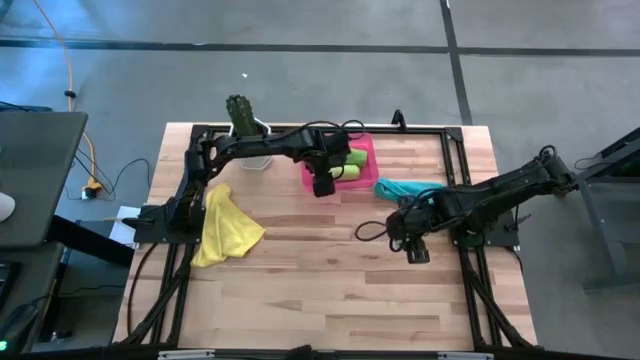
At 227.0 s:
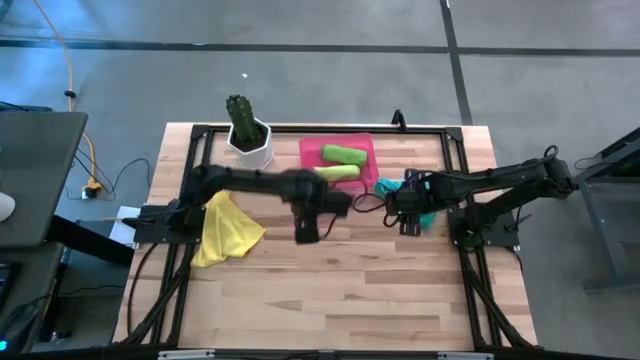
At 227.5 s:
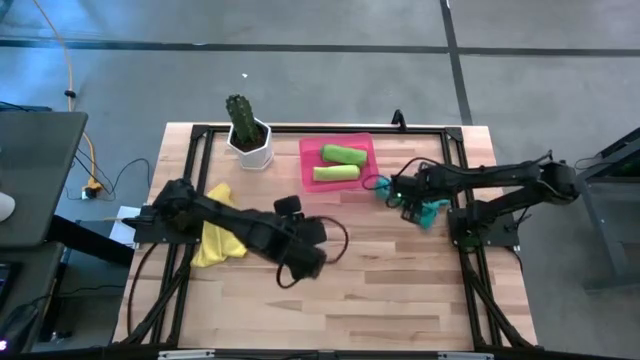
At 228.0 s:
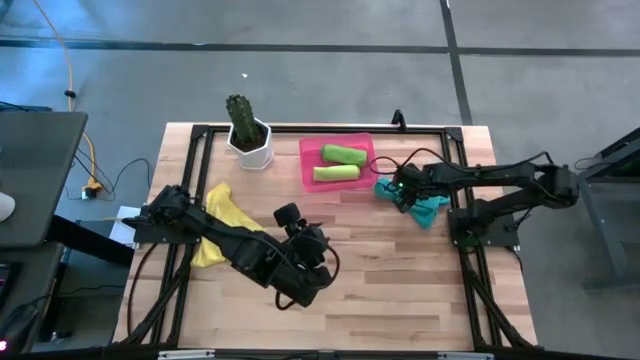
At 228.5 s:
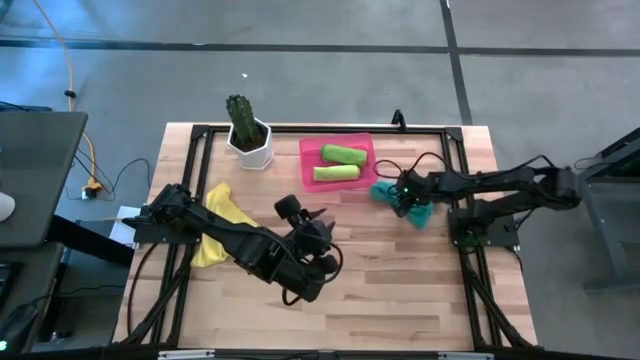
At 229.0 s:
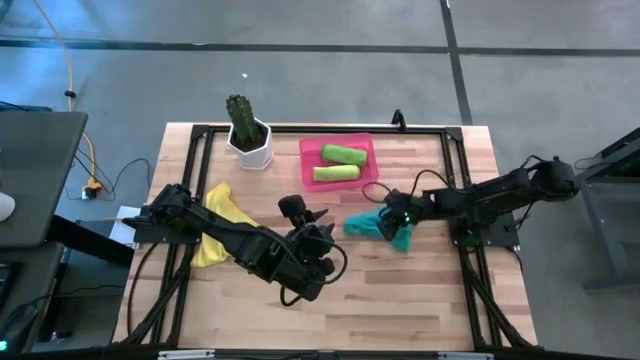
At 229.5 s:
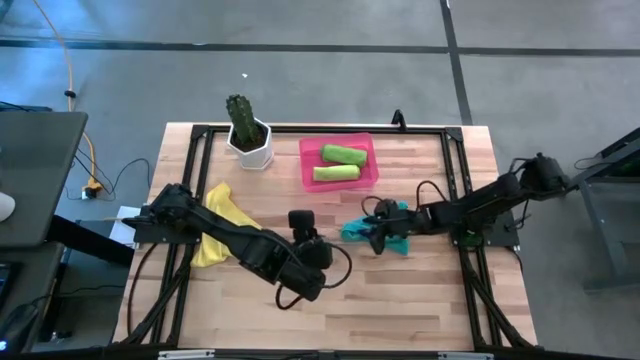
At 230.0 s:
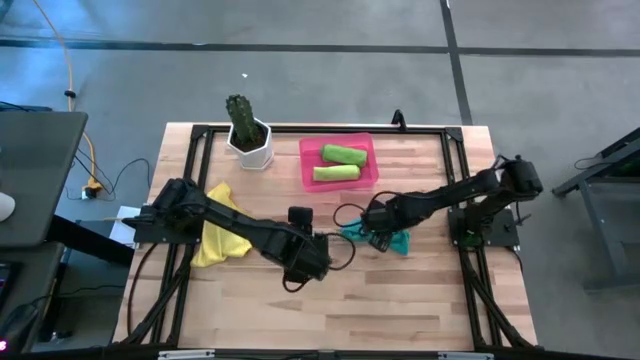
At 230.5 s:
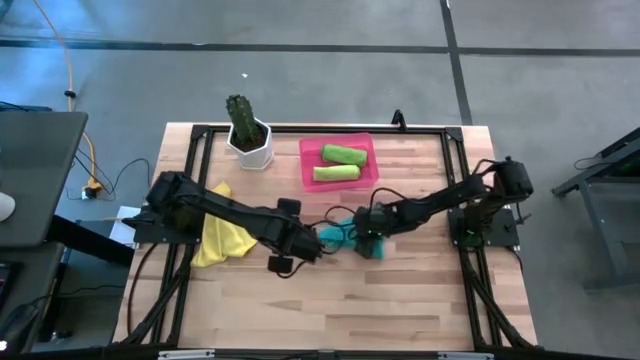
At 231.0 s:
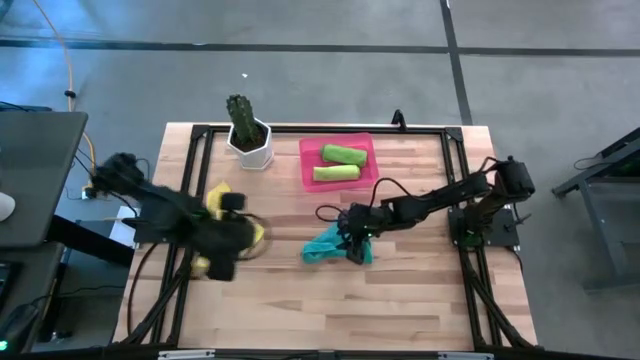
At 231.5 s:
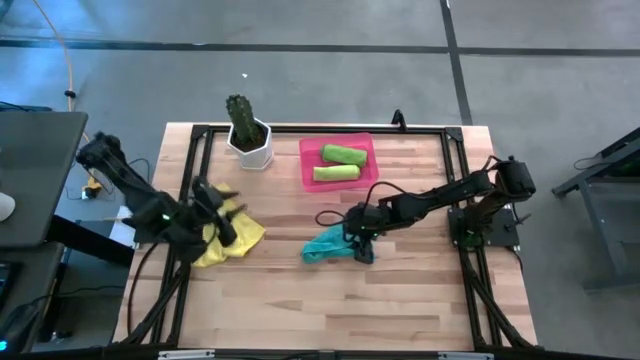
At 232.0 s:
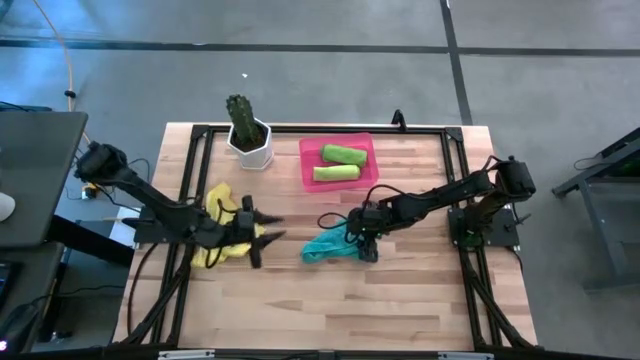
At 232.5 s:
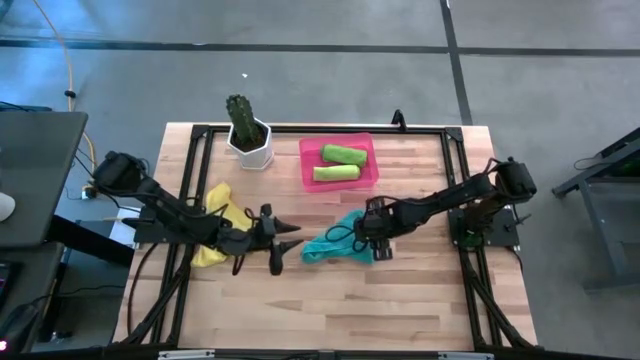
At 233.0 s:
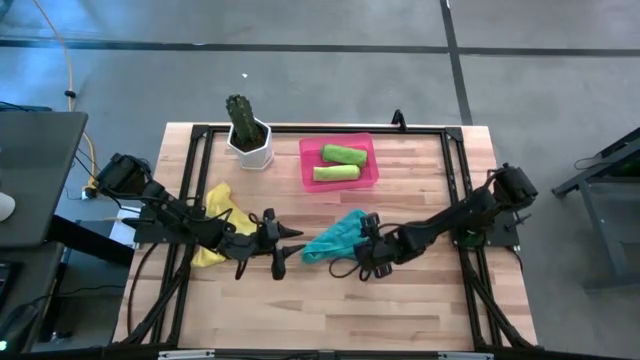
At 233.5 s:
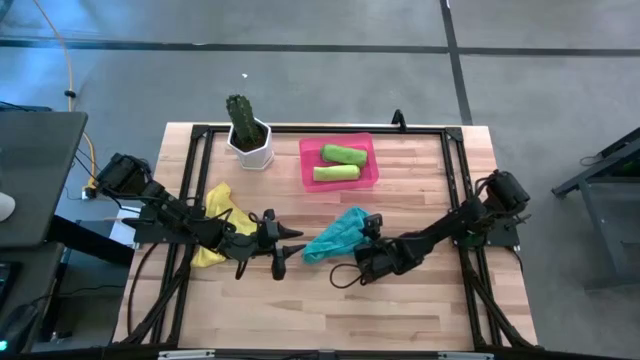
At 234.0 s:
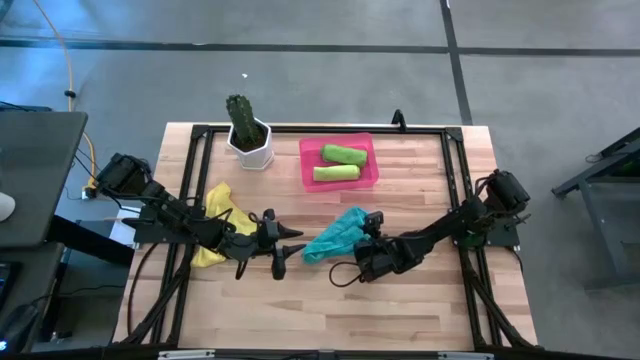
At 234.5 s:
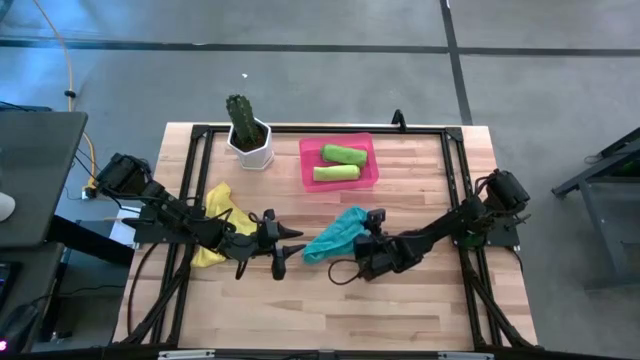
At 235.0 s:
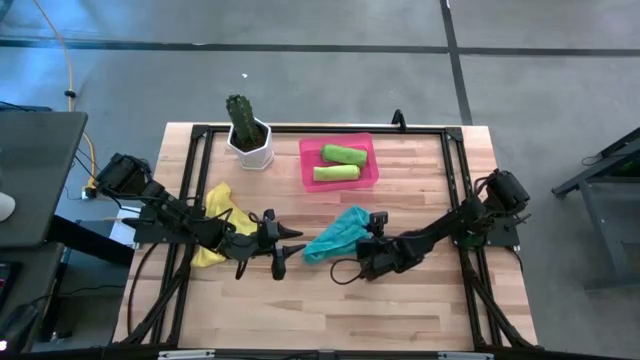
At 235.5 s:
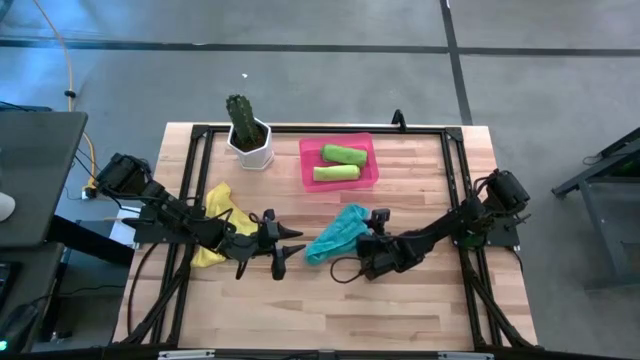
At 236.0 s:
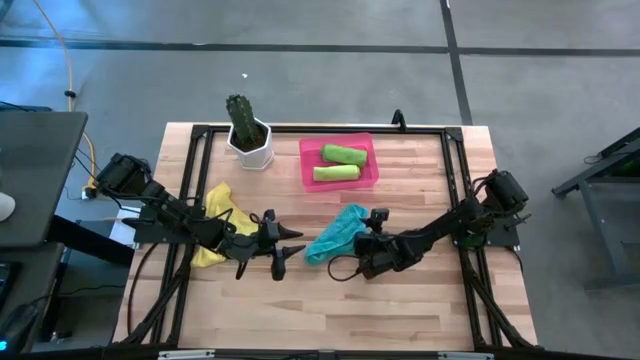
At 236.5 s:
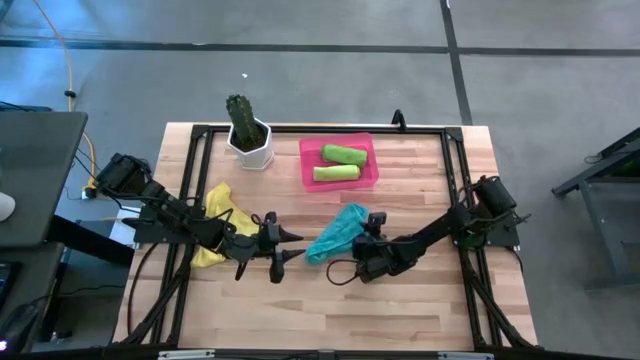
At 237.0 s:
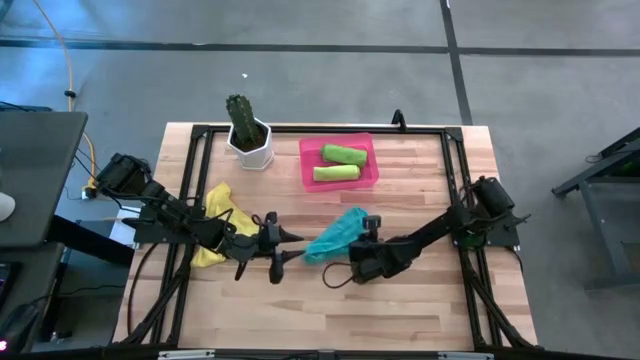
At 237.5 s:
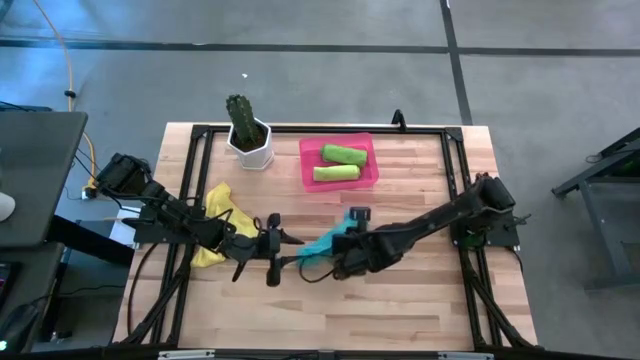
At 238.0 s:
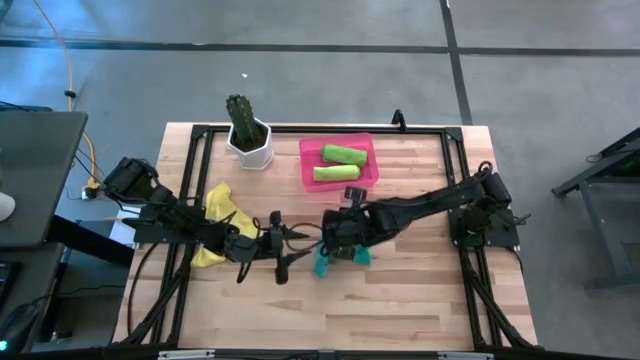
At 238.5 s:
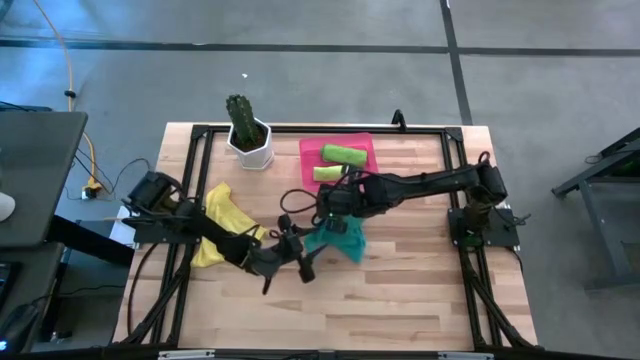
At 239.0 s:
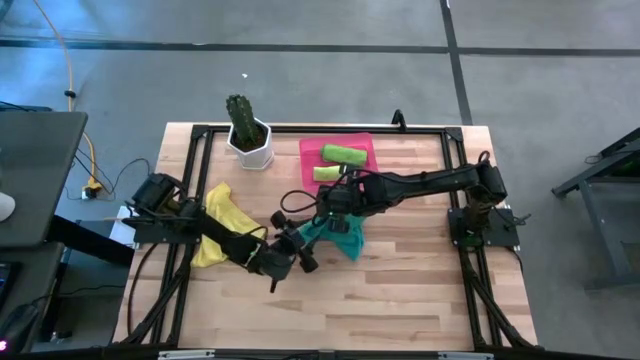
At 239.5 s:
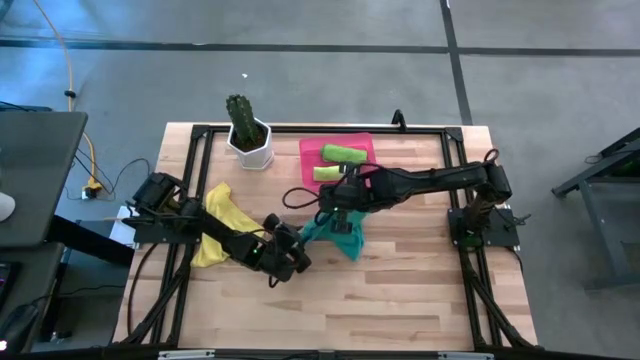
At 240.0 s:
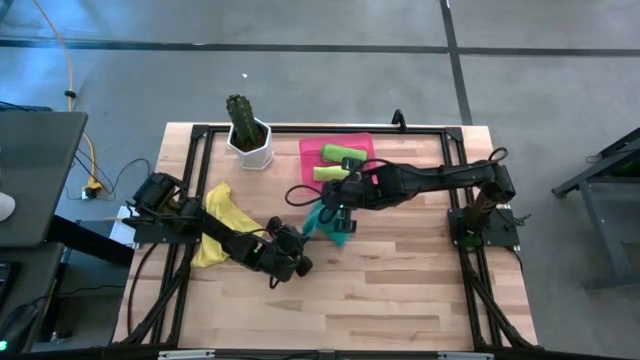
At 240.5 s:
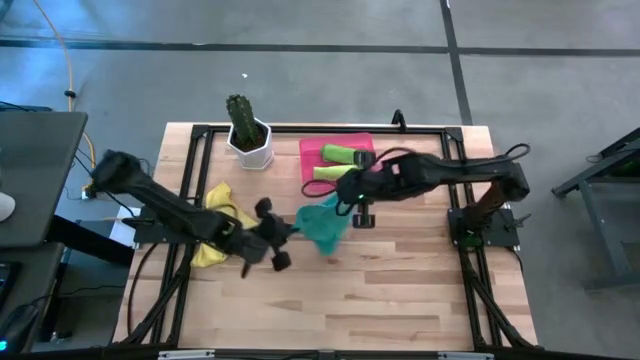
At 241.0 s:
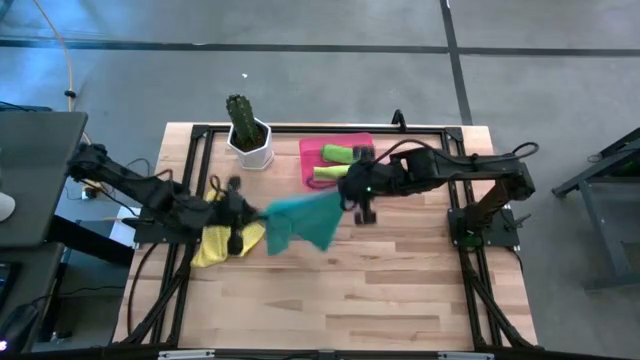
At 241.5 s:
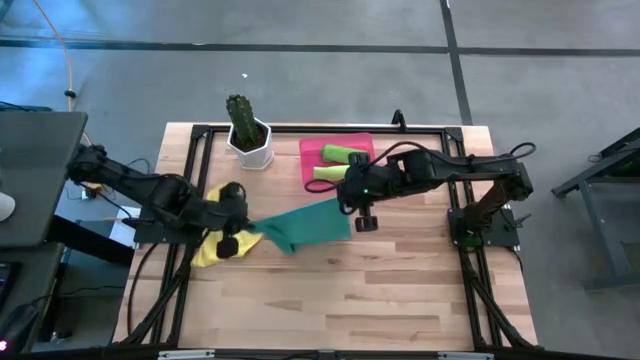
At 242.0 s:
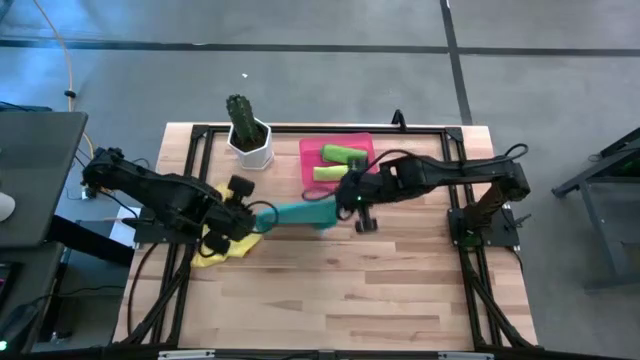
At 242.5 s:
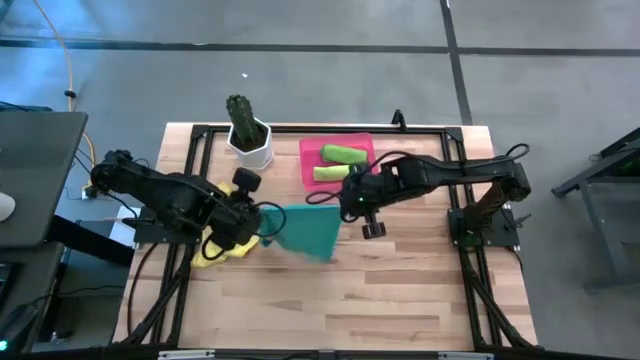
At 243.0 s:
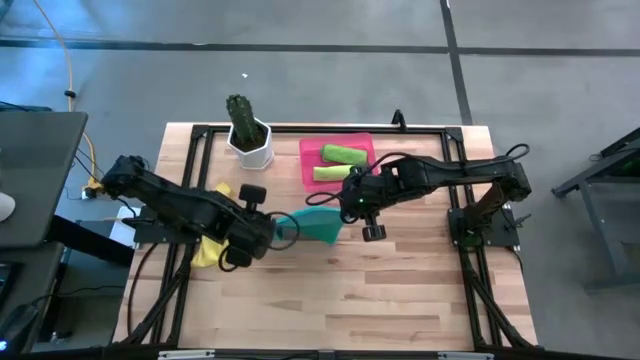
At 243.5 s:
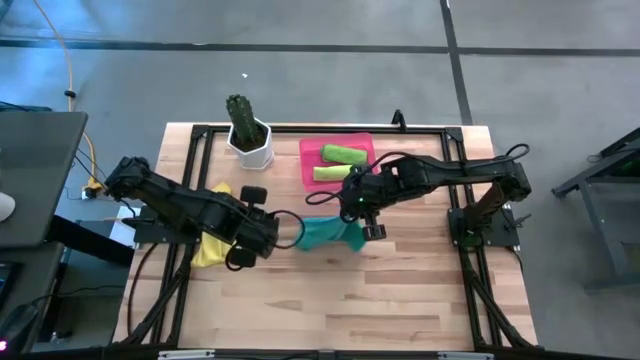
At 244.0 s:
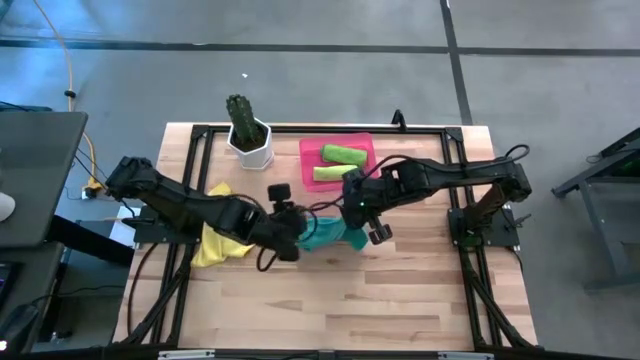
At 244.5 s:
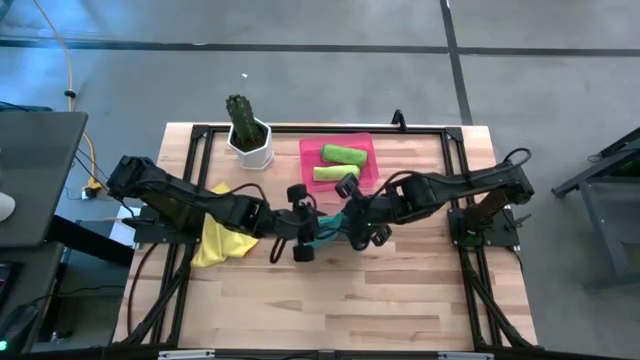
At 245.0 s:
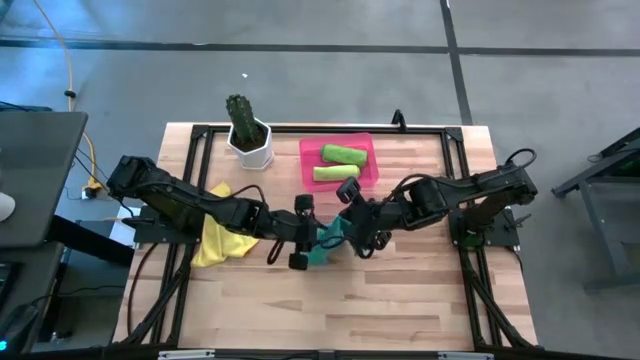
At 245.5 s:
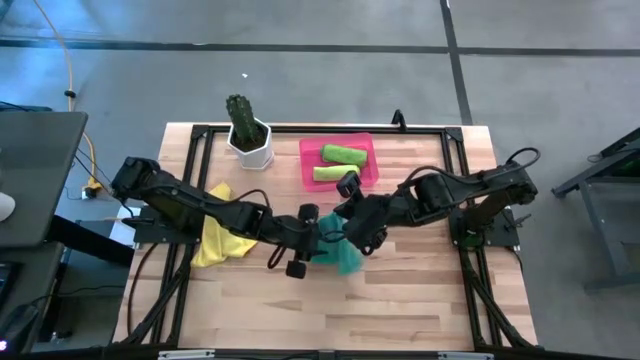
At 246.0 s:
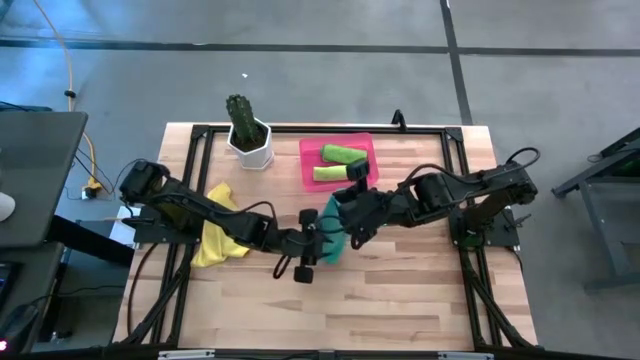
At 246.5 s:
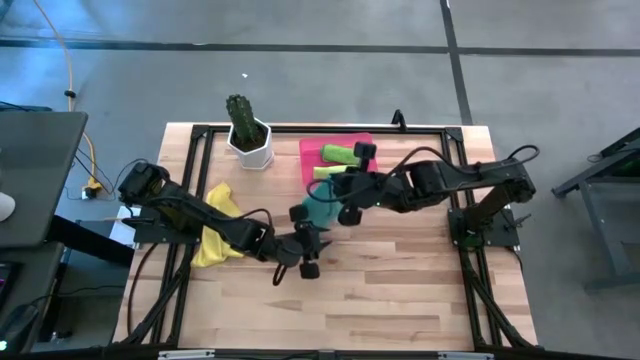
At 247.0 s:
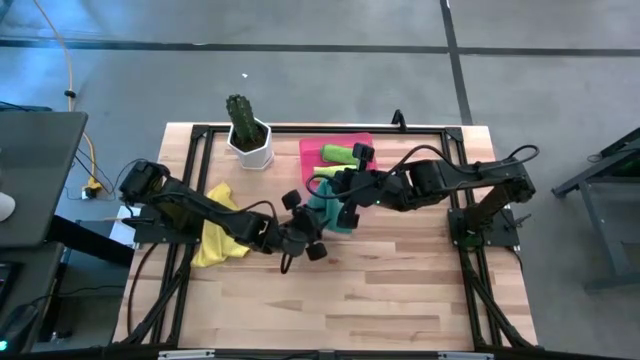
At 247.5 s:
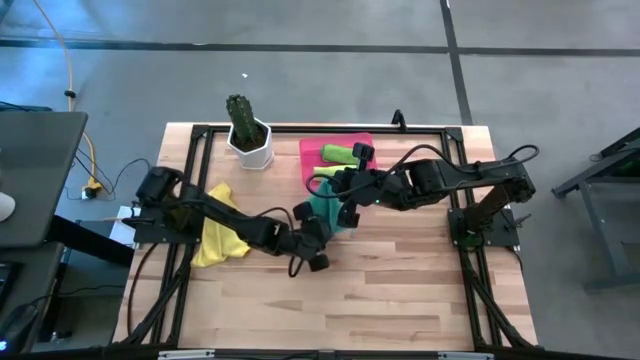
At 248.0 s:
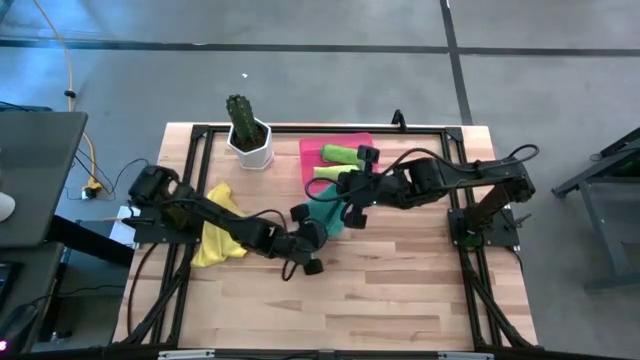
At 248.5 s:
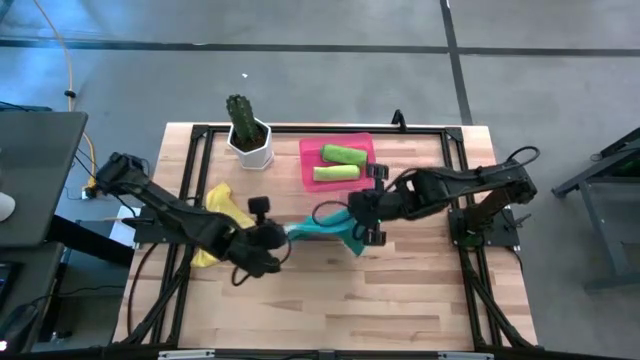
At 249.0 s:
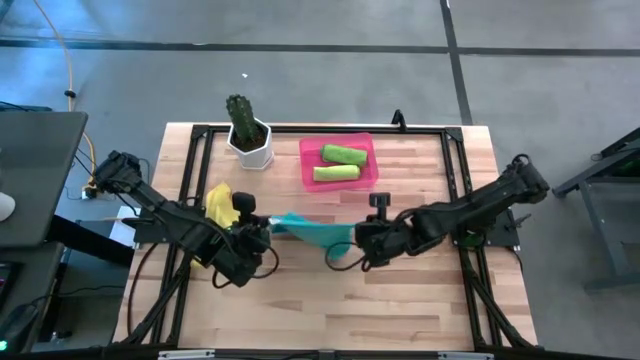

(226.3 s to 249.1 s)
Task: Roll microfiber towels into tight, uniform cylinder then place into a basket
Roll the blue microfiber cloth
